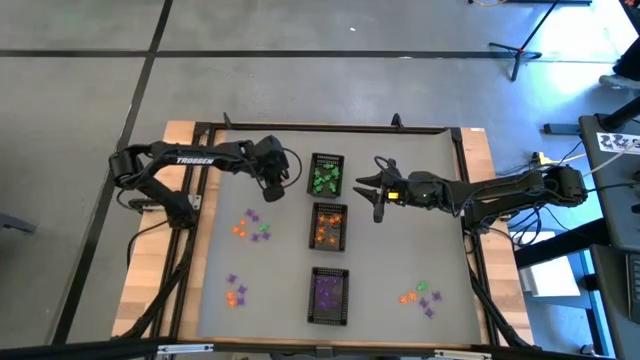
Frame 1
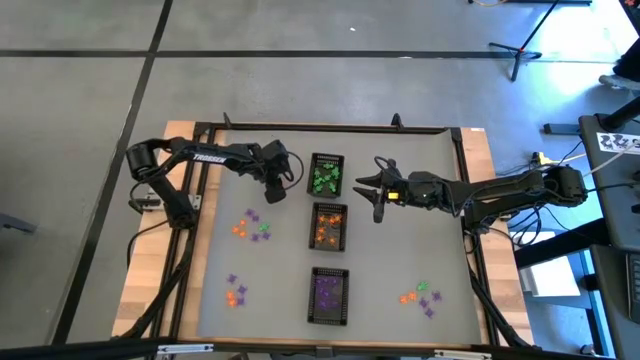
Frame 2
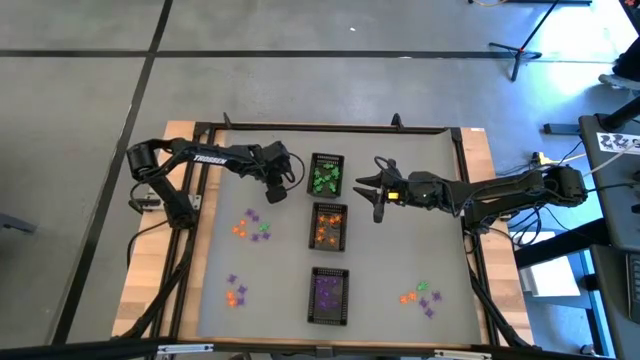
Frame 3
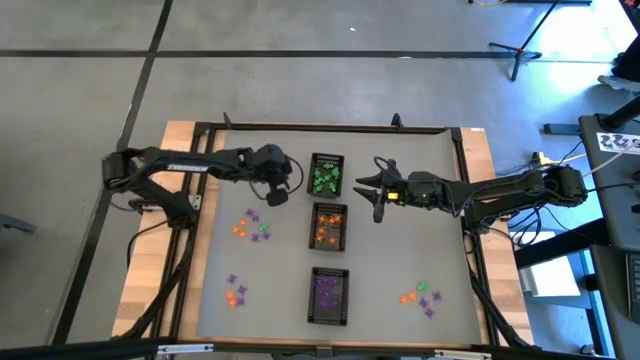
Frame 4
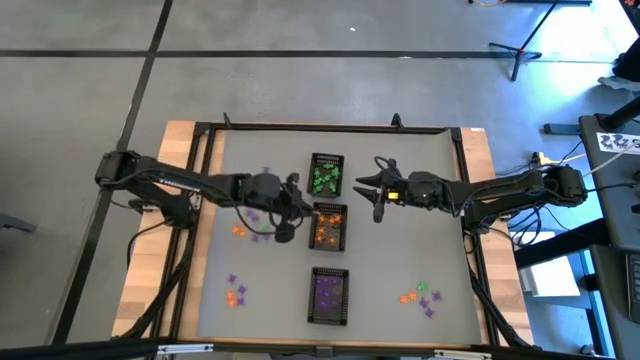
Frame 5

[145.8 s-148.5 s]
Task: Sort Halloween decoration
Put the orange spider toy into the middle black bin

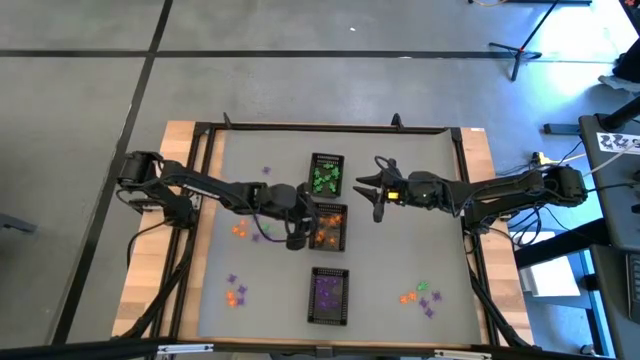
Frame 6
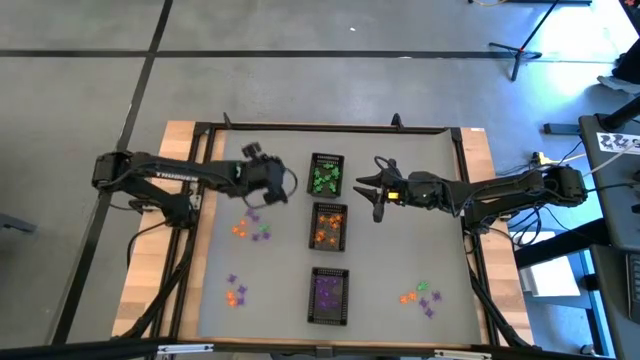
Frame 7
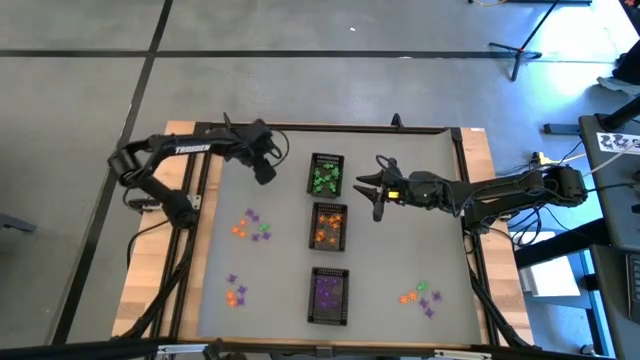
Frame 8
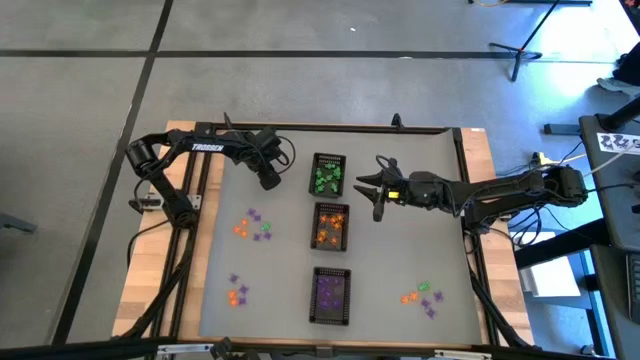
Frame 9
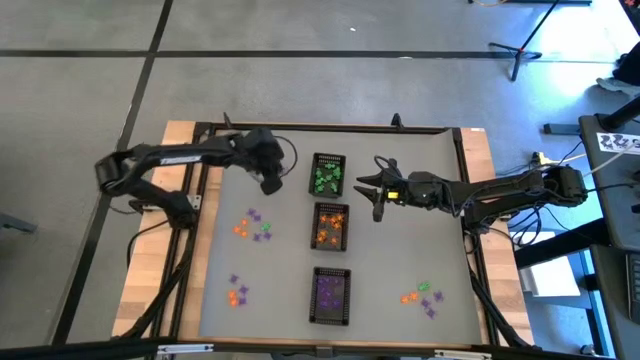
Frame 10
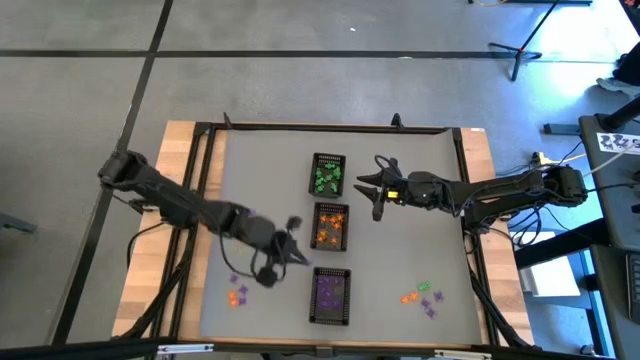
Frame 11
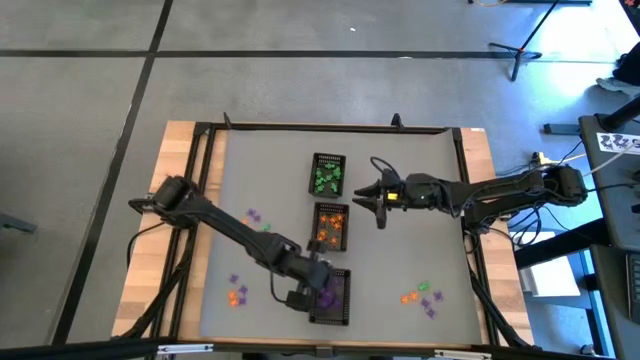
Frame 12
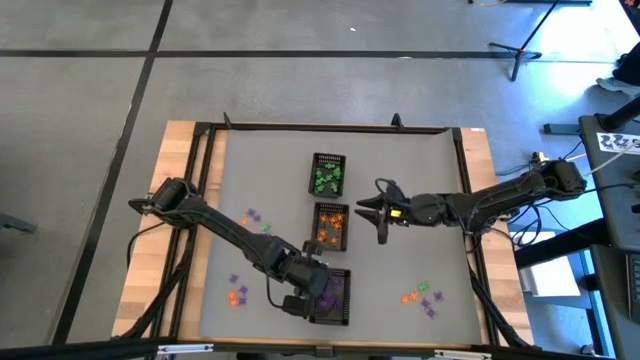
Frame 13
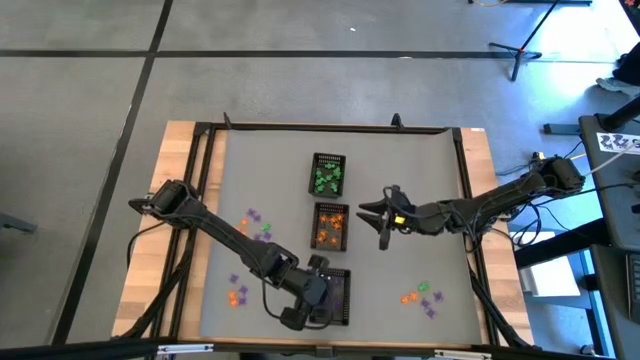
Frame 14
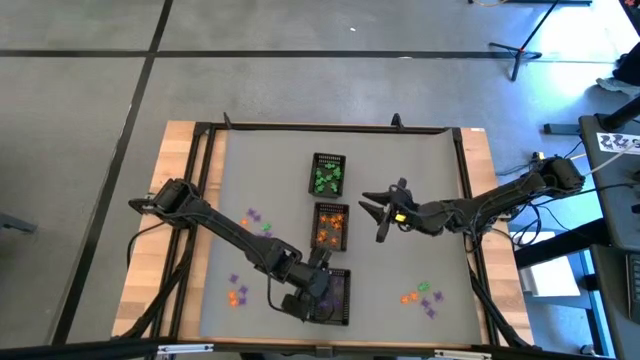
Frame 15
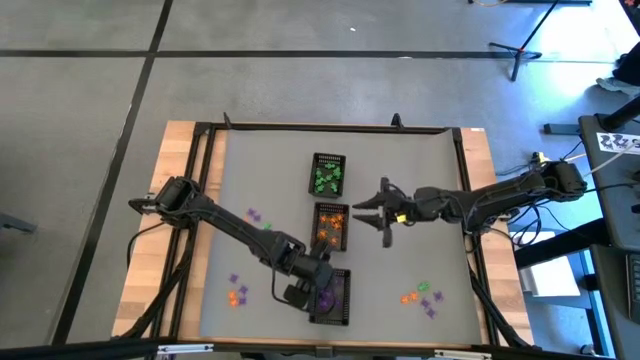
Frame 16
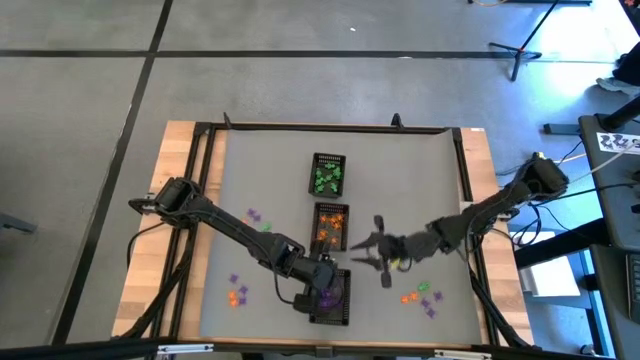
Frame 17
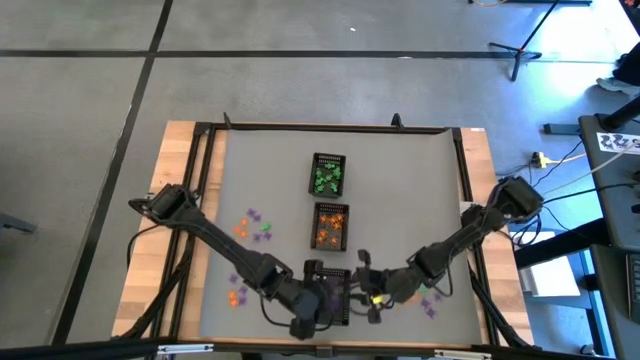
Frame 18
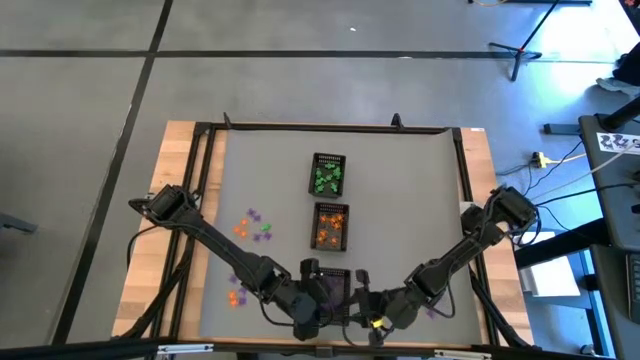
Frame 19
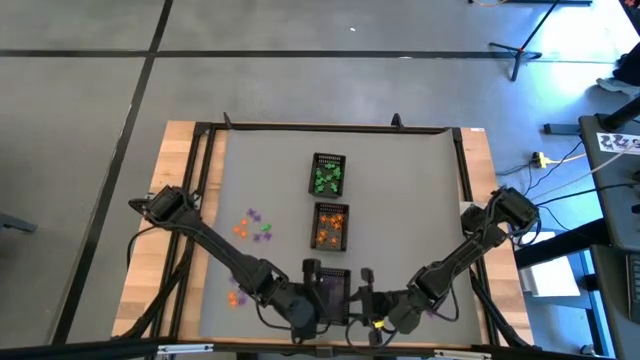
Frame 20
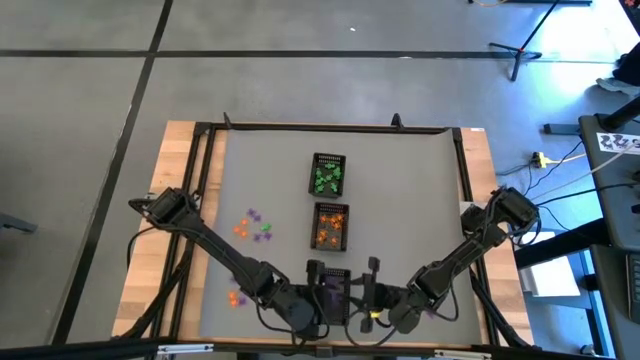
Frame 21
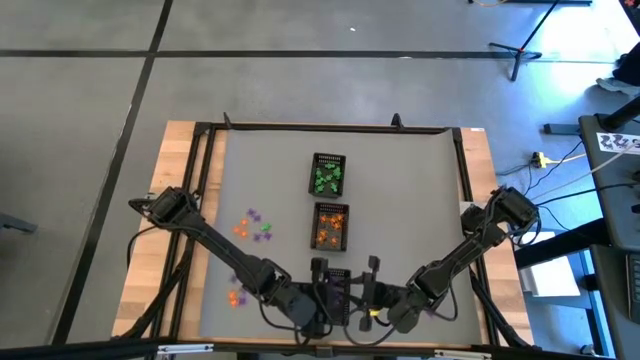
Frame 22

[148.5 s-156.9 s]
Put the violet spider toy into the bottom black bin

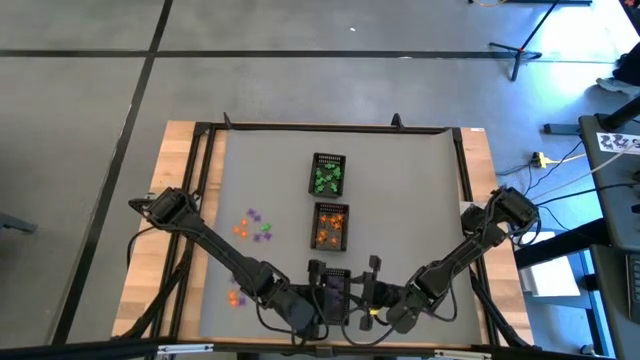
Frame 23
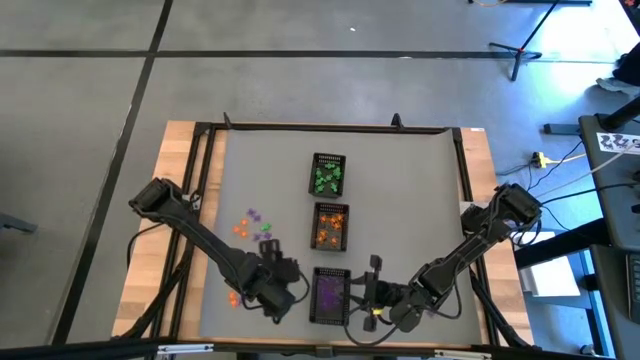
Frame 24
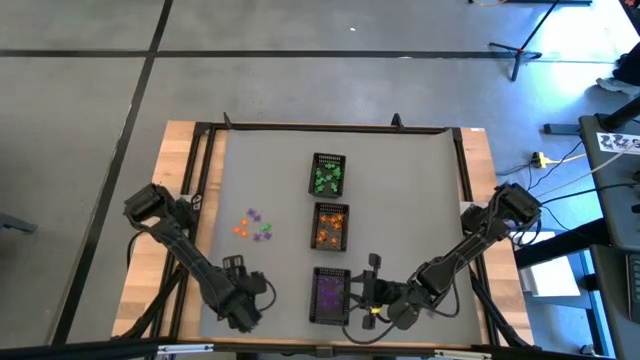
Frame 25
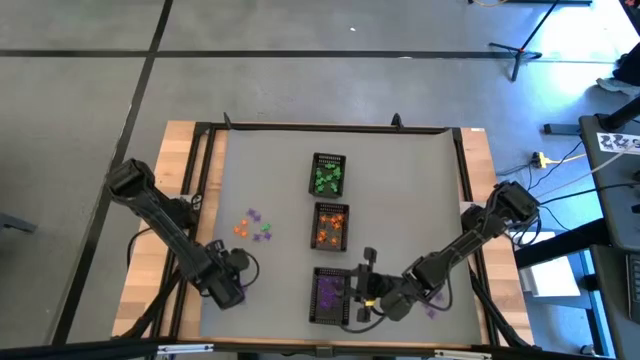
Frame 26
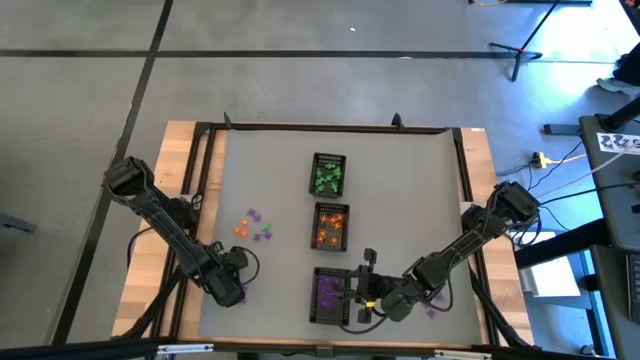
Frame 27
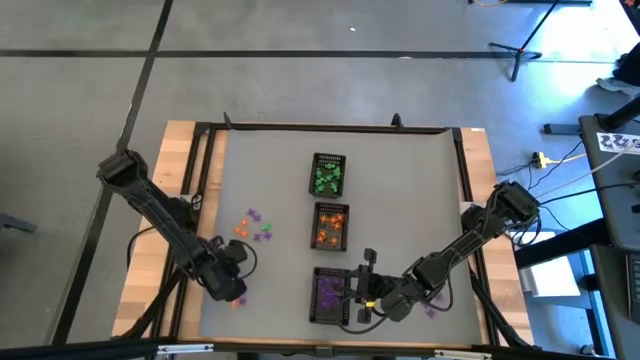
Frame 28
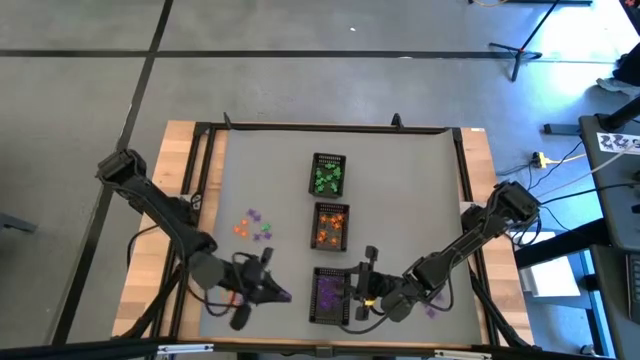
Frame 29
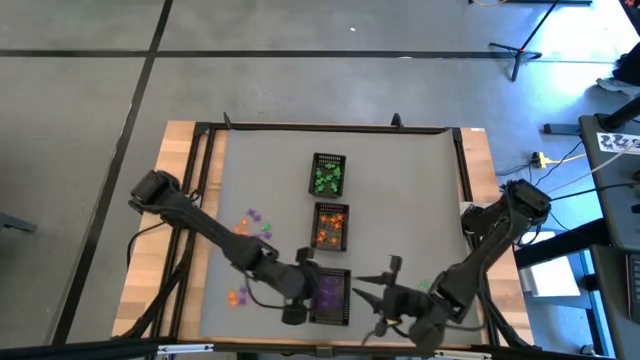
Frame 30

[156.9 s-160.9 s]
Put the violet spider toy into the bottom black bin

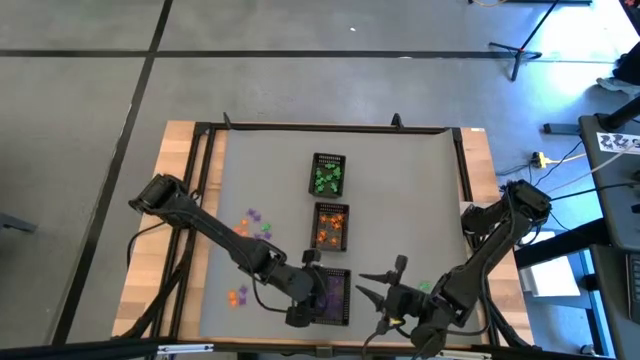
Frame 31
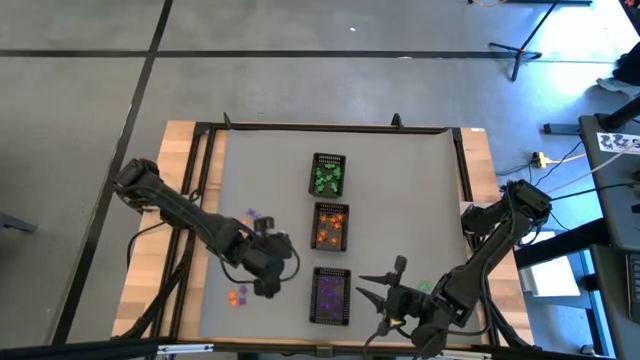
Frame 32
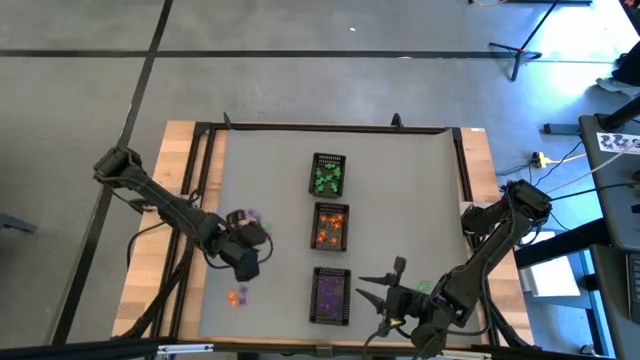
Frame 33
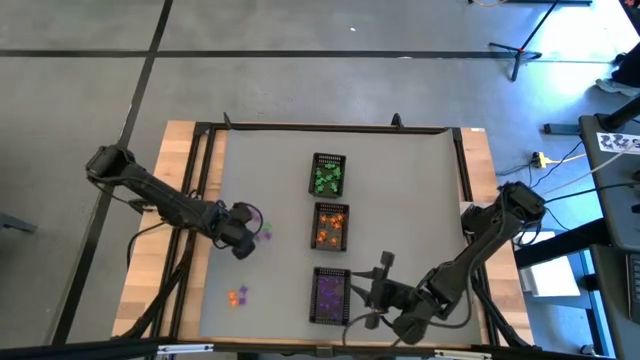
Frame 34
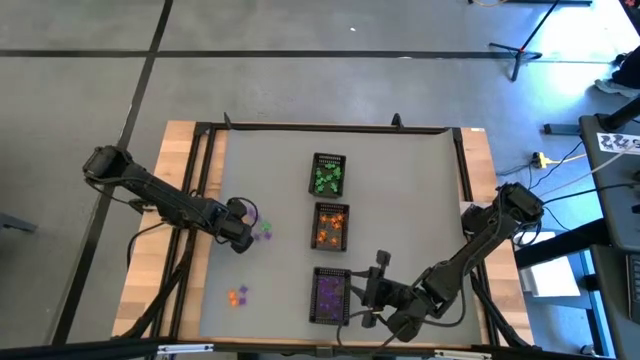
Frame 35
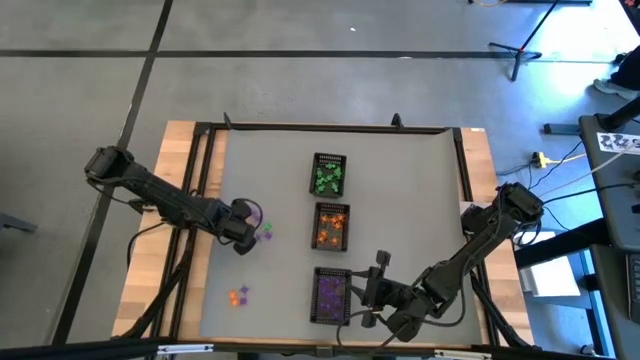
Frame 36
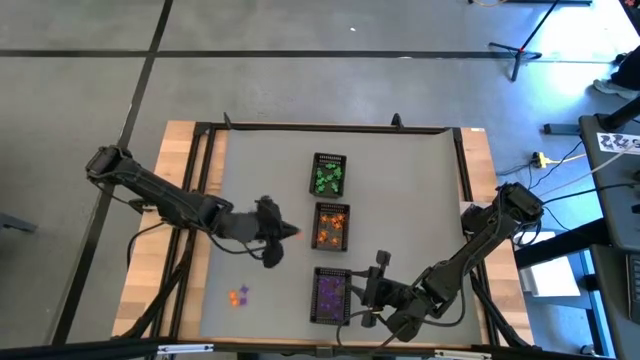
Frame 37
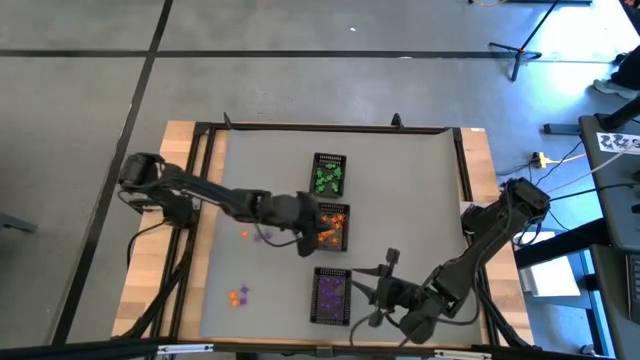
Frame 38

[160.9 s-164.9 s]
Put the orange spider toy into the middle black bin

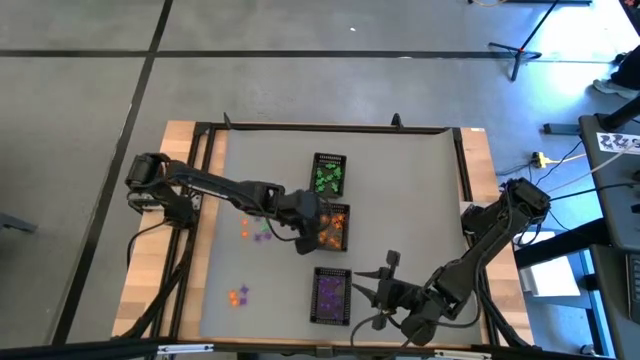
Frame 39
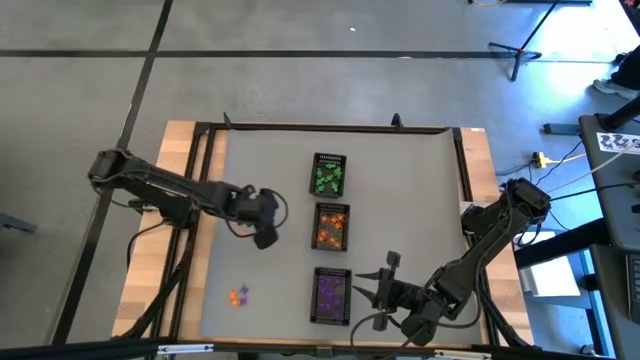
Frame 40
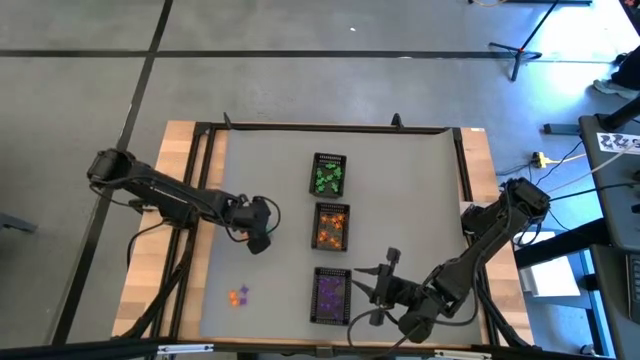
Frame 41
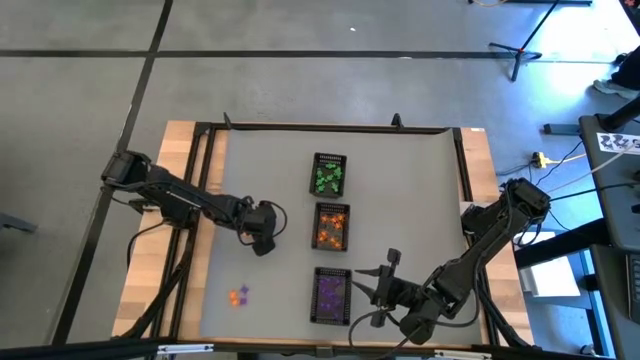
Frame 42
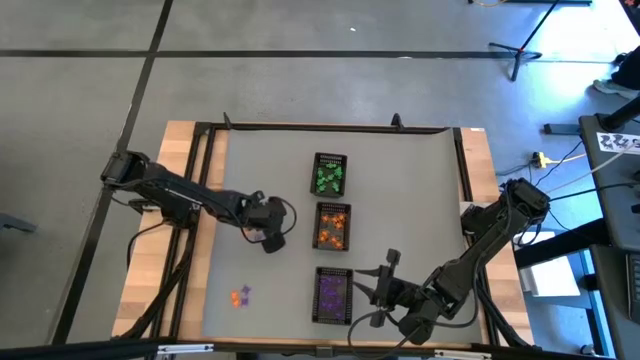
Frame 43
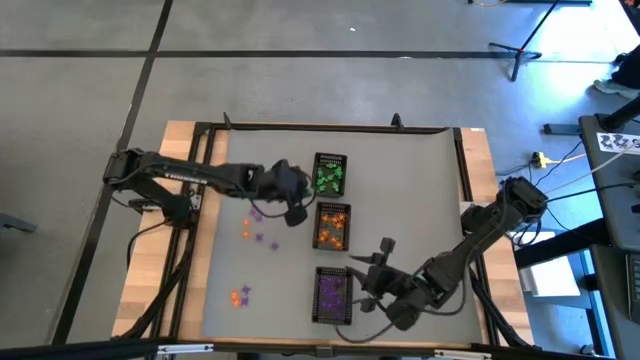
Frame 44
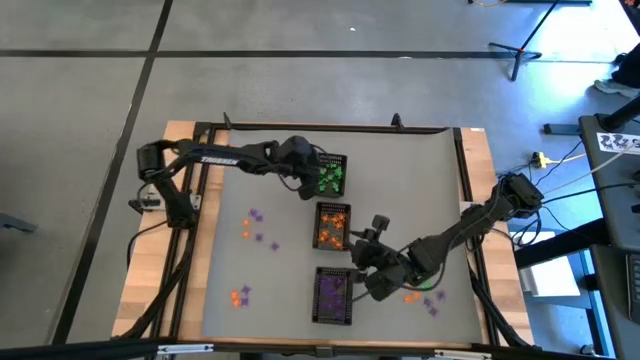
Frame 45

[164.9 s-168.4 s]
Put the green skeleton toy into the top black bin
